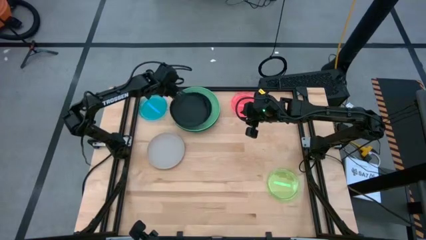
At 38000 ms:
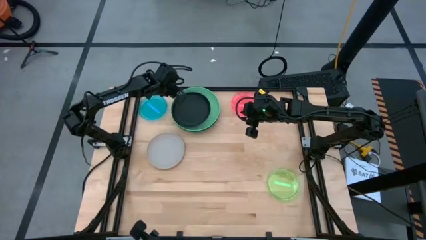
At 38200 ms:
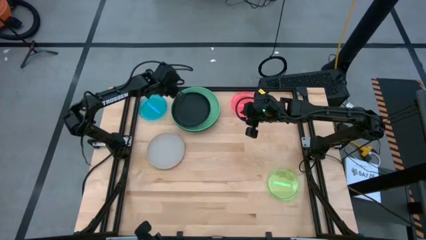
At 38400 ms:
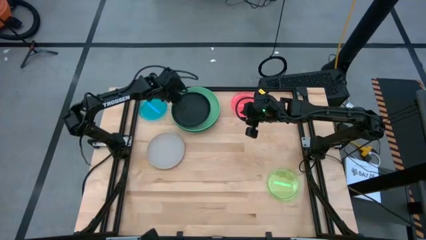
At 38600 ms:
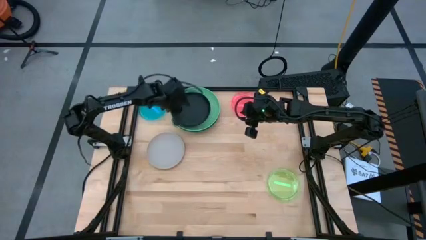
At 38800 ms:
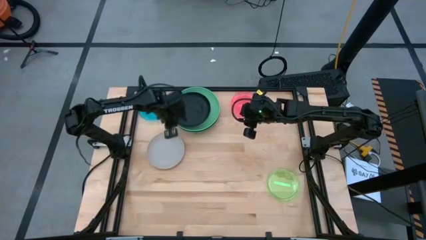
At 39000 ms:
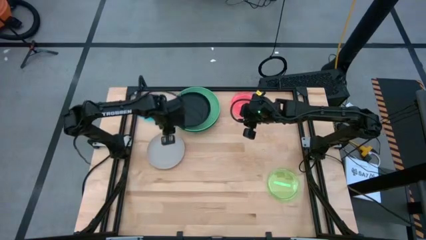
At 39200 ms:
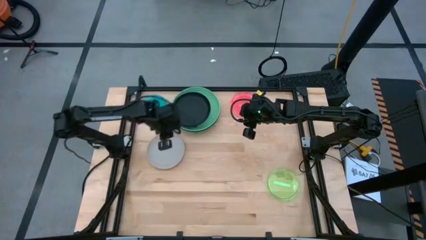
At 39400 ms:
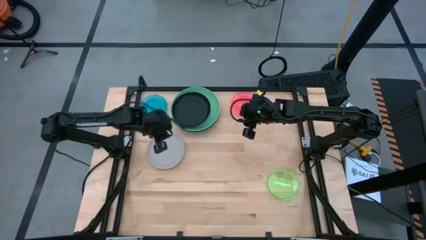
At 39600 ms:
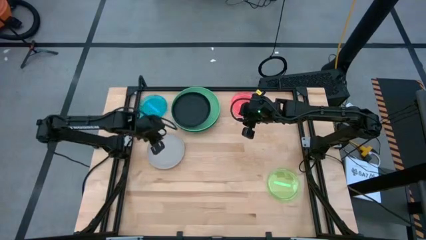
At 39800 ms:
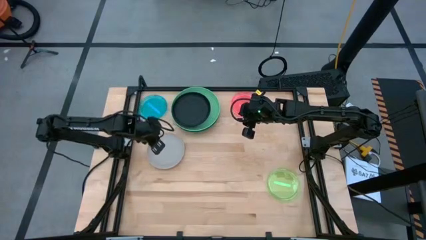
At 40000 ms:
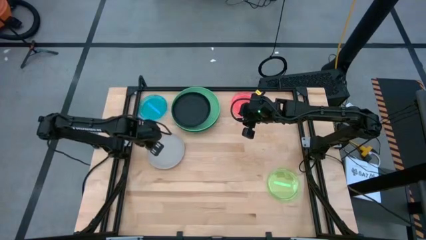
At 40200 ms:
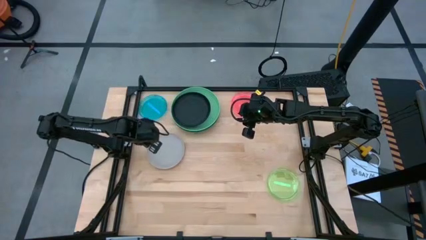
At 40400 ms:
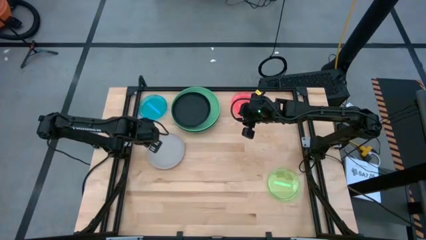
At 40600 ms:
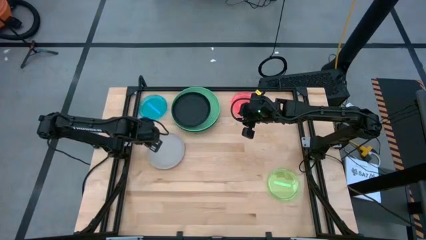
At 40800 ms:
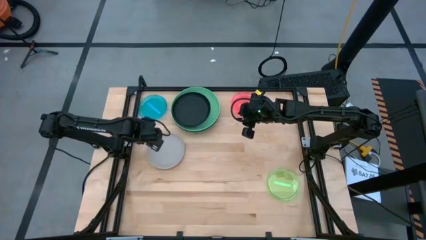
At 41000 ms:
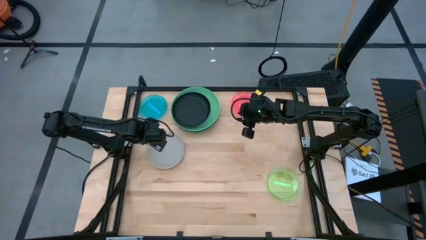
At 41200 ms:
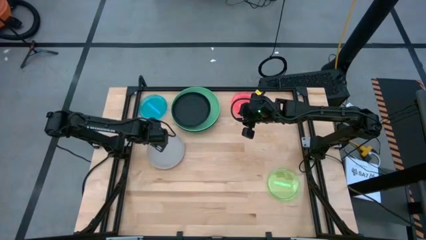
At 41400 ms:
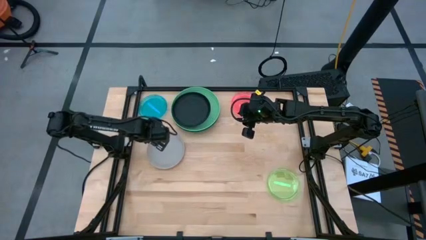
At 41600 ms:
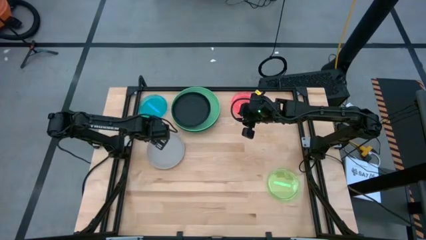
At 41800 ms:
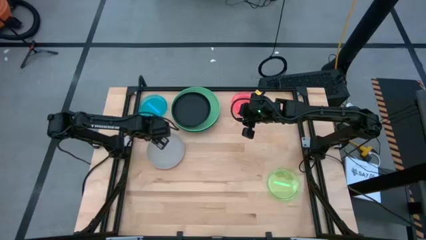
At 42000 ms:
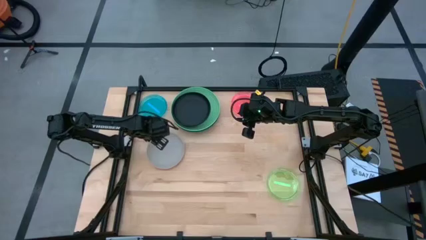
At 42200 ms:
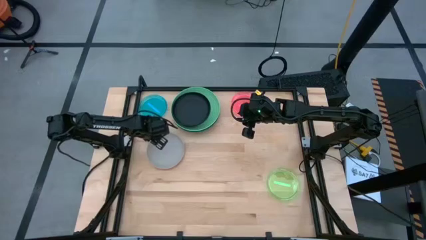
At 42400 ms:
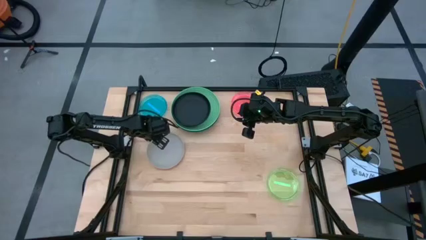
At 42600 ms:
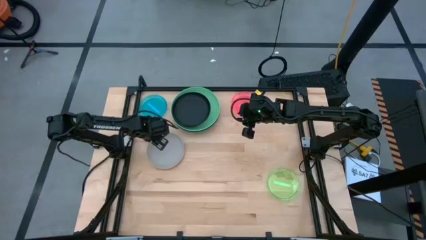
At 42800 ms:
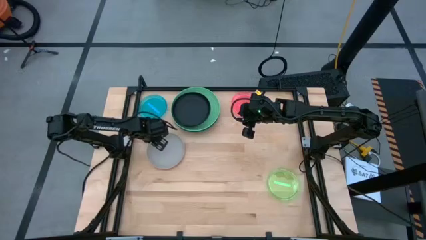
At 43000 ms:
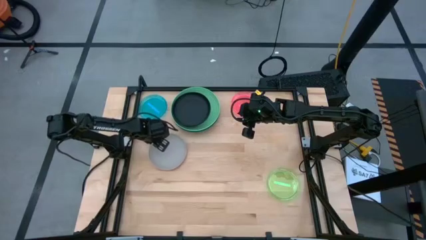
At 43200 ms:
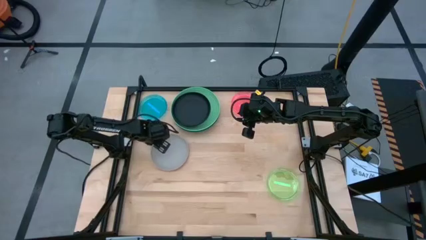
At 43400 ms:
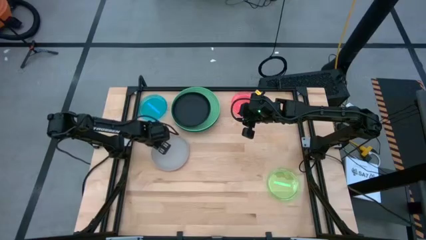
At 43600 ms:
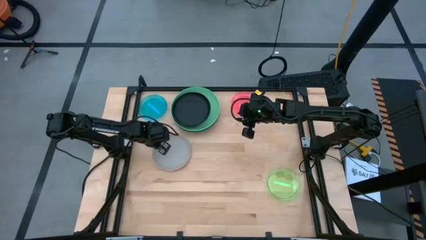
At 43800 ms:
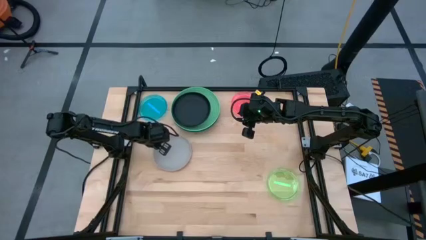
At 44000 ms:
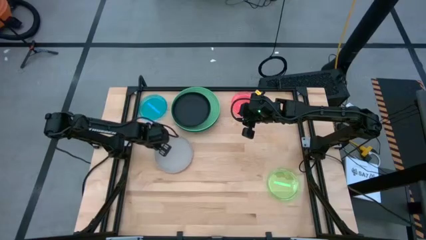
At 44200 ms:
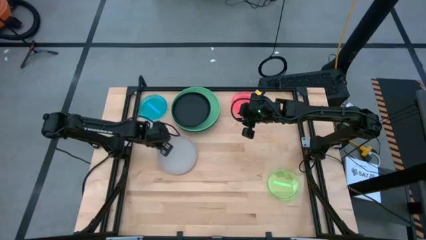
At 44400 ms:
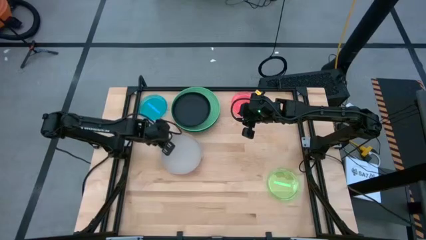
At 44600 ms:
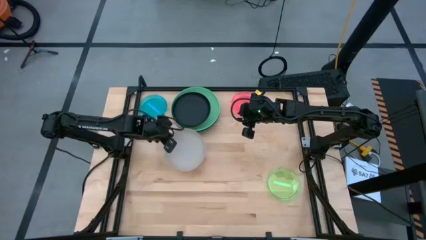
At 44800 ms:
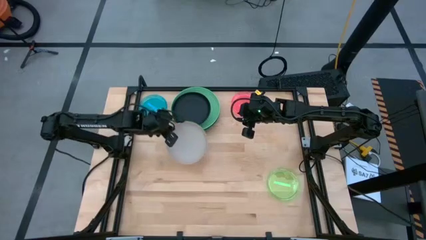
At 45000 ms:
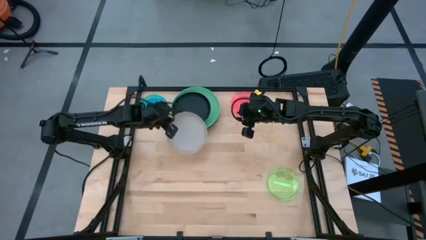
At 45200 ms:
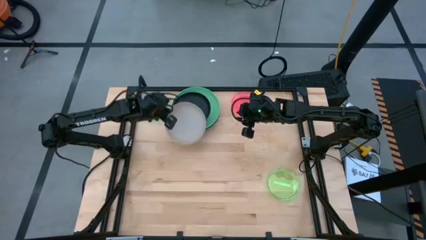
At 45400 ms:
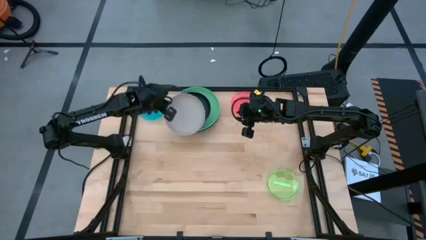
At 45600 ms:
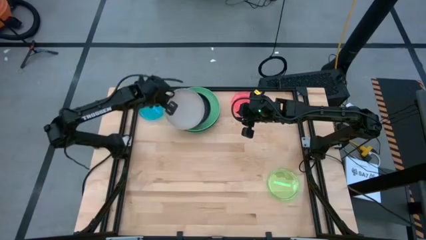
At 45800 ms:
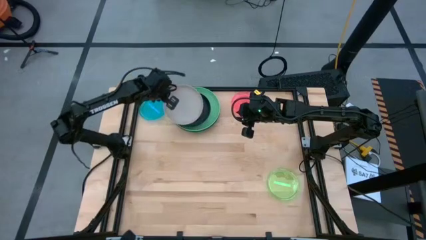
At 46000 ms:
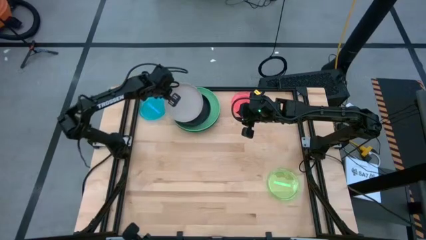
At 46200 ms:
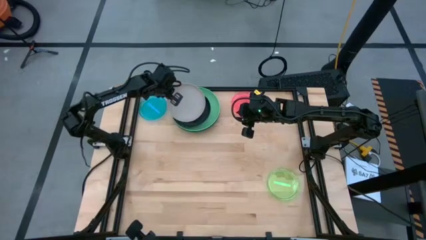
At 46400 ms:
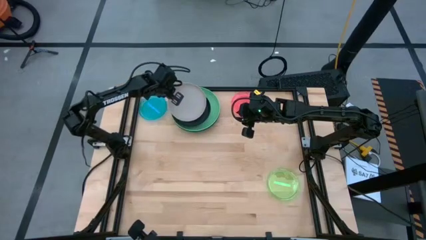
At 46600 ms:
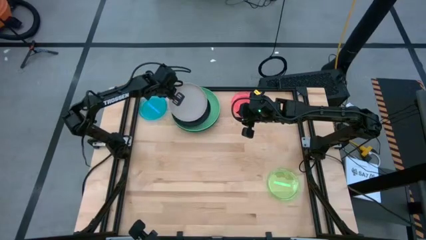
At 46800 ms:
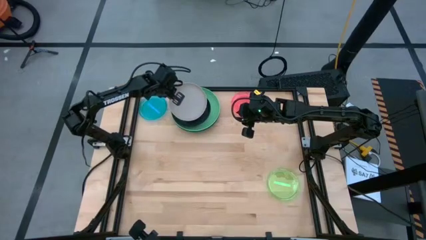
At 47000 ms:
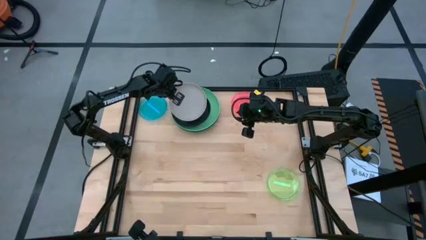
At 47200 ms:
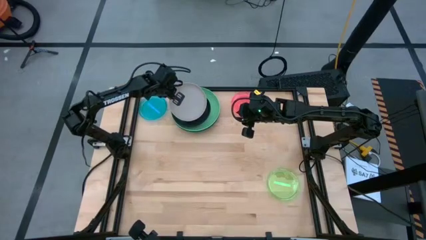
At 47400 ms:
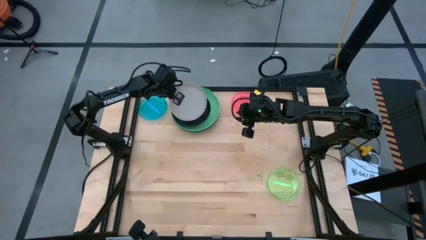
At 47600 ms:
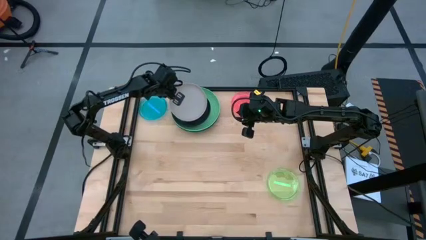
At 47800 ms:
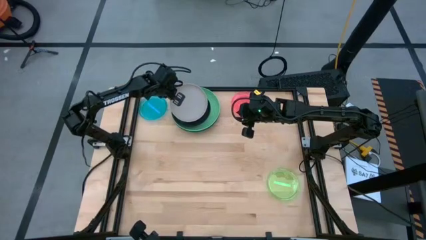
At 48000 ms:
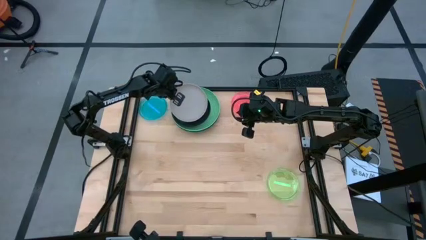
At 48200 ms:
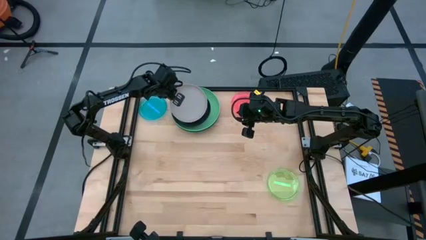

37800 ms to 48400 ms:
Task: Stack plastic plates
Stack the gray plate on the black plate

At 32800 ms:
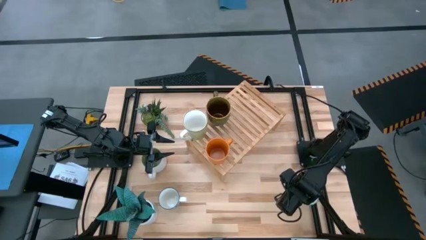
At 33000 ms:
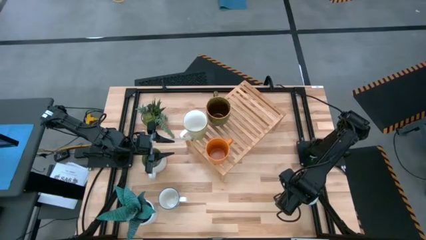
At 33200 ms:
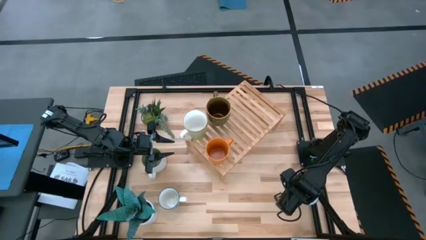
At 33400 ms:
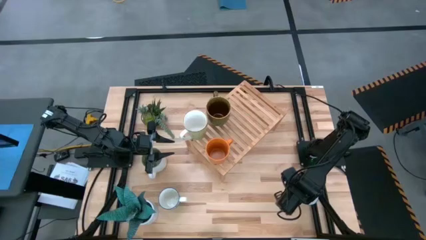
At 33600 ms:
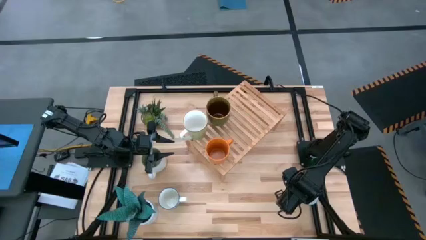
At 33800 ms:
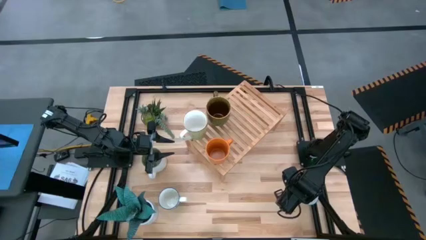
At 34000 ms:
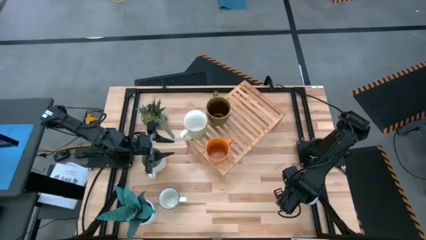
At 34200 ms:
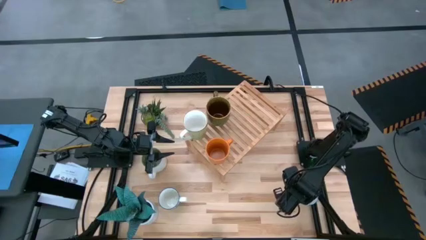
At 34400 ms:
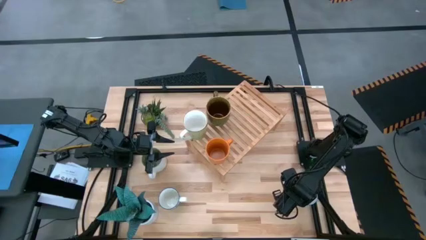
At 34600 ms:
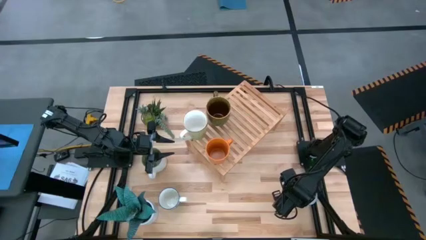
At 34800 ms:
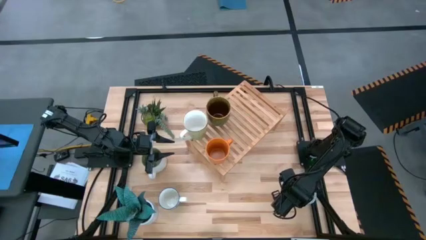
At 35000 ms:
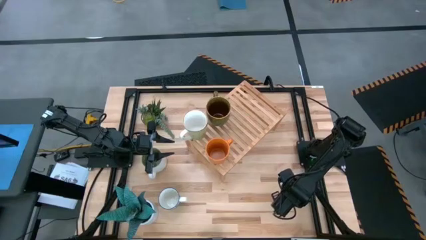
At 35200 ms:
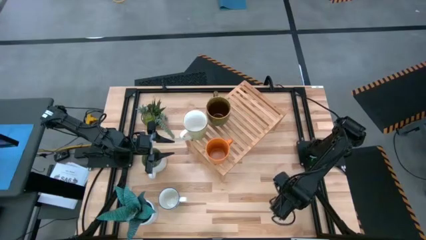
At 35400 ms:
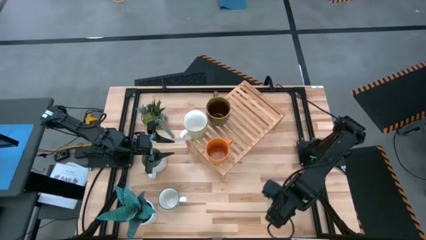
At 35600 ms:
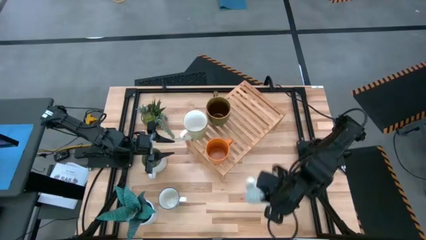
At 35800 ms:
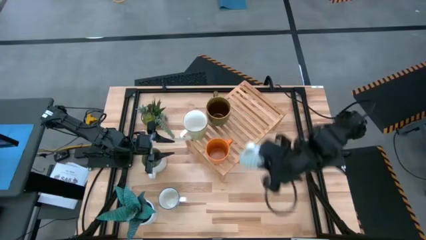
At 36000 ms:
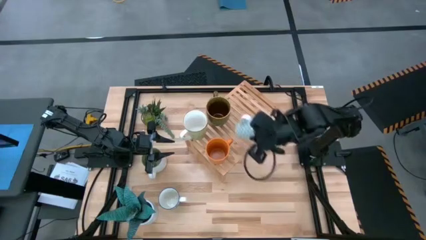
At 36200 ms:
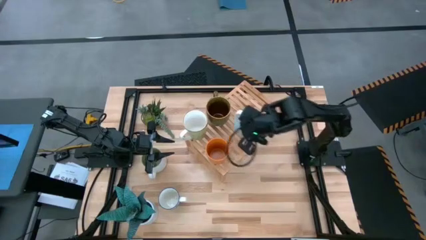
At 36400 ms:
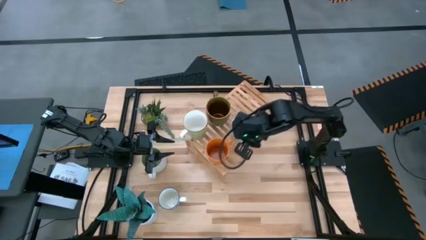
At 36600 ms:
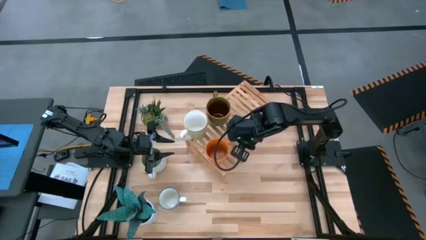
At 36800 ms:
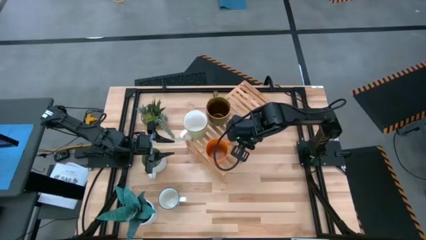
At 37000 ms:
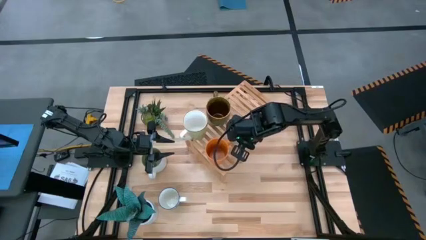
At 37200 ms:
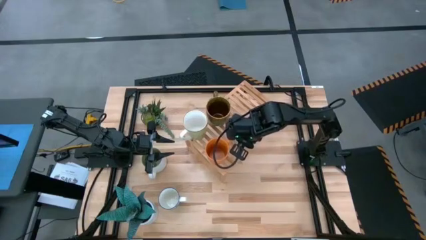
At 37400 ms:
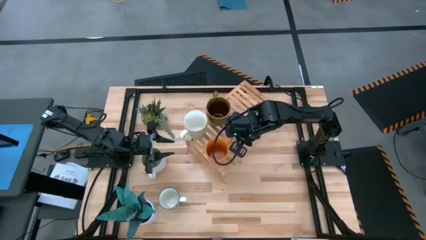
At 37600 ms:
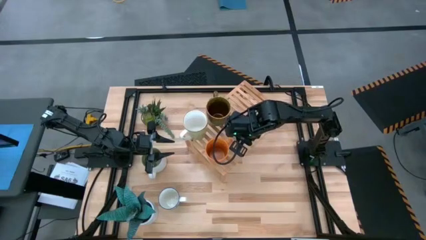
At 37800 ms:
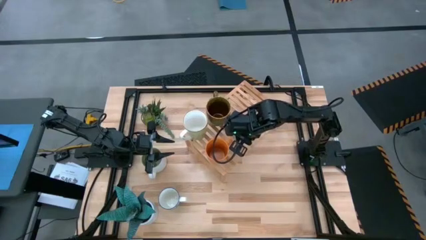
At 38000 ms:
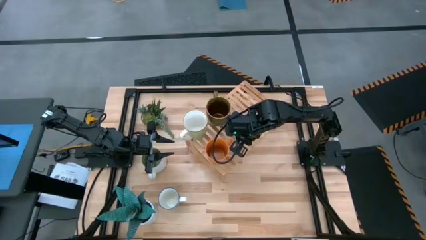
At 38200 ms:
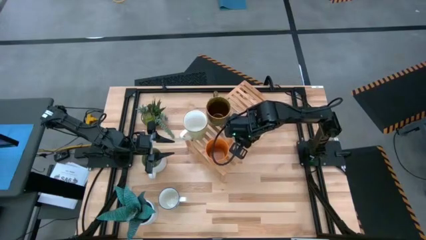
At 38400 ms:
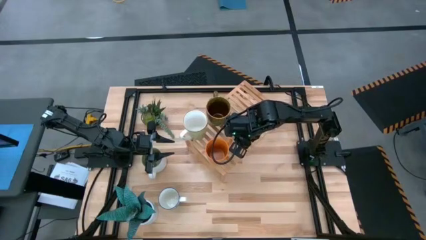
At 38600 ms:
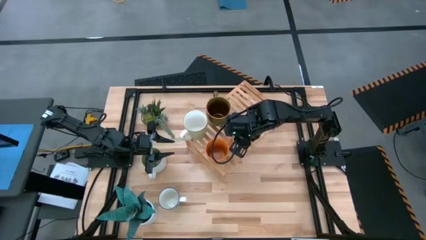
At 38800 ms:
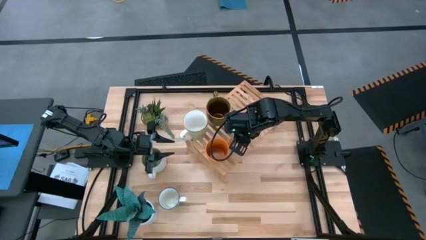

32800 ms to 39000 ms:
Task: Place coffee mugs
Put the light blue mug on the shelf
